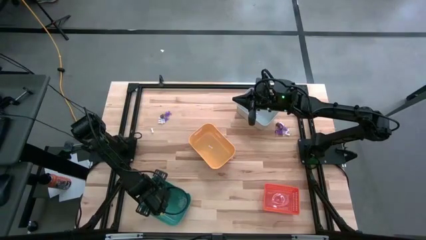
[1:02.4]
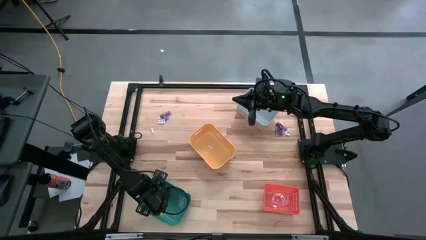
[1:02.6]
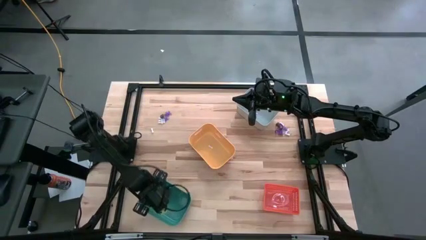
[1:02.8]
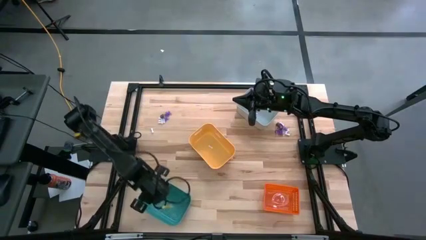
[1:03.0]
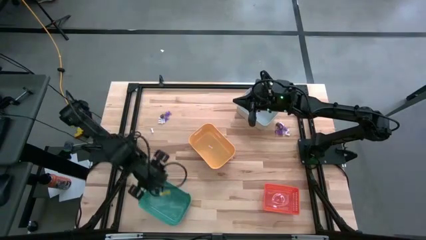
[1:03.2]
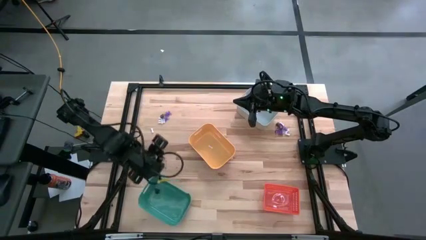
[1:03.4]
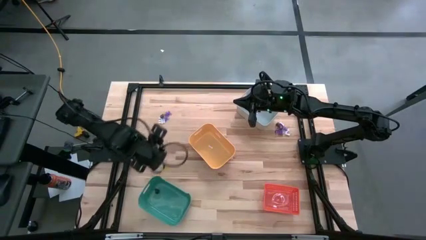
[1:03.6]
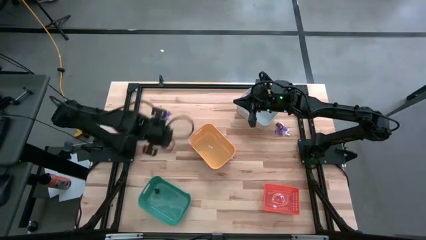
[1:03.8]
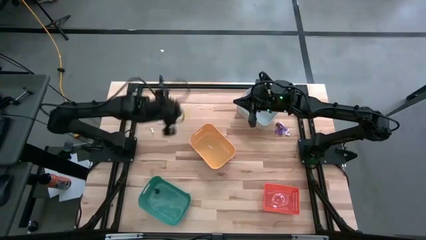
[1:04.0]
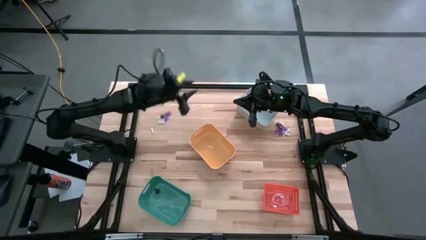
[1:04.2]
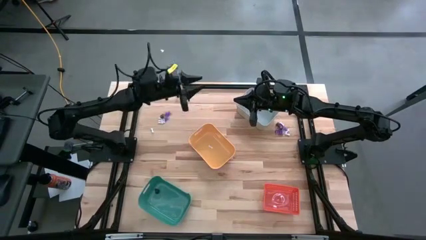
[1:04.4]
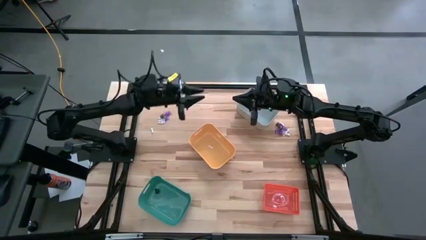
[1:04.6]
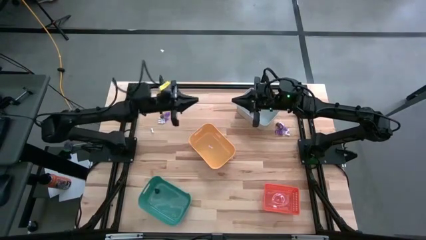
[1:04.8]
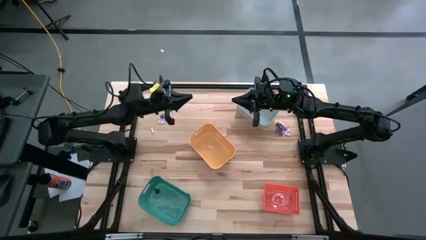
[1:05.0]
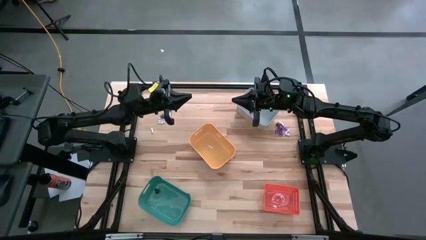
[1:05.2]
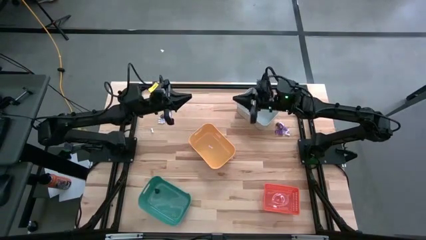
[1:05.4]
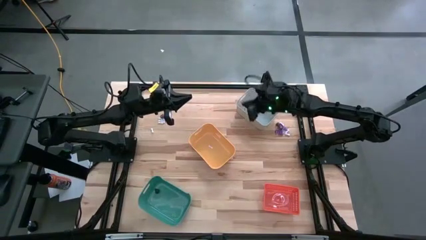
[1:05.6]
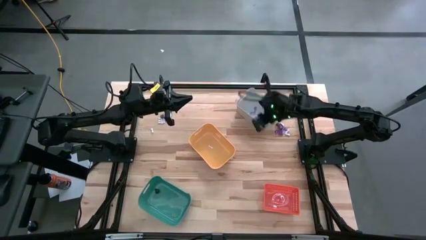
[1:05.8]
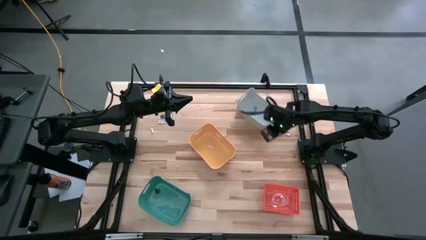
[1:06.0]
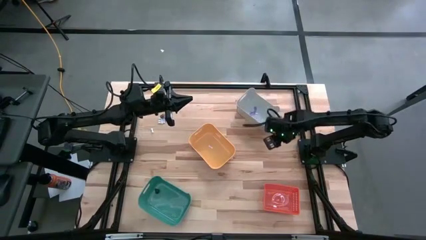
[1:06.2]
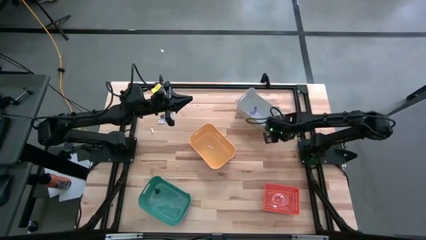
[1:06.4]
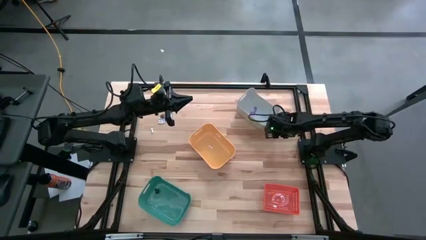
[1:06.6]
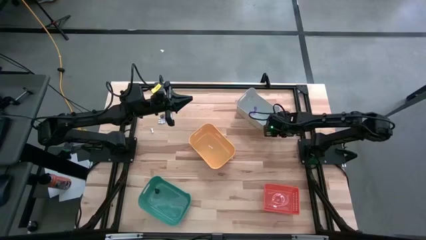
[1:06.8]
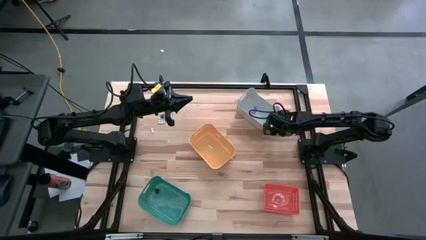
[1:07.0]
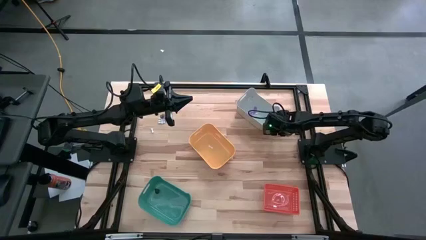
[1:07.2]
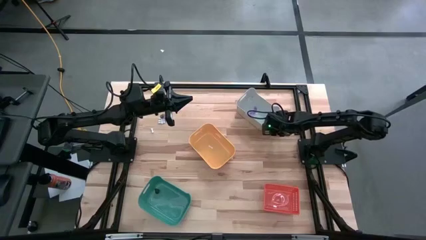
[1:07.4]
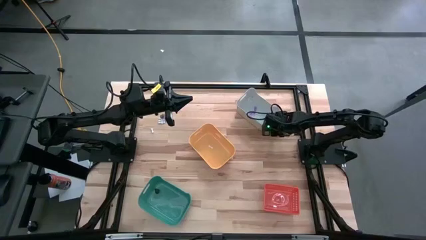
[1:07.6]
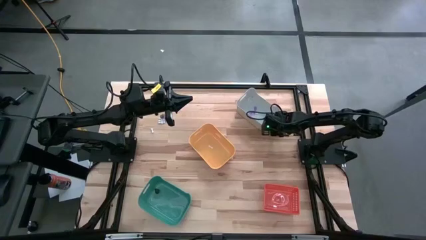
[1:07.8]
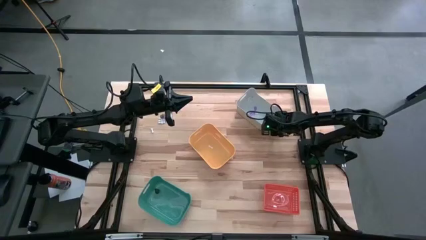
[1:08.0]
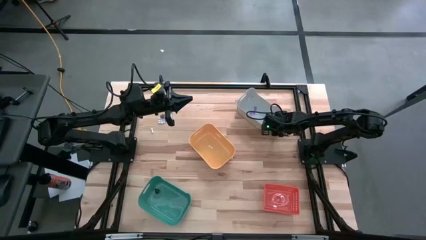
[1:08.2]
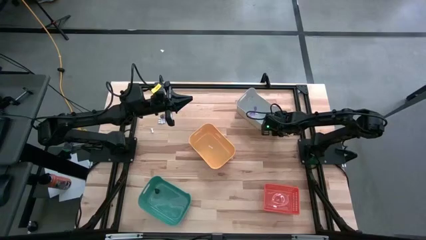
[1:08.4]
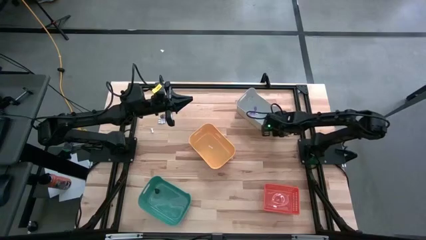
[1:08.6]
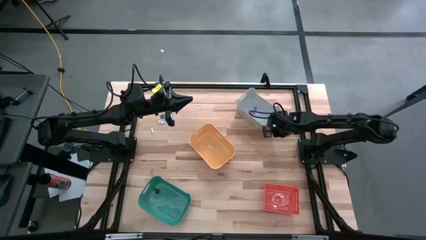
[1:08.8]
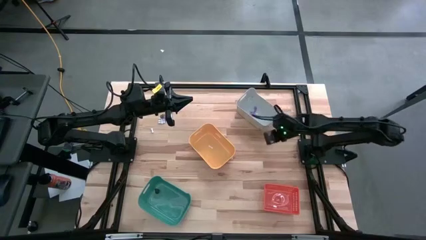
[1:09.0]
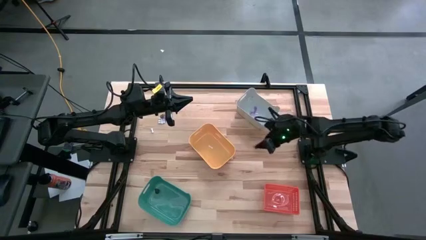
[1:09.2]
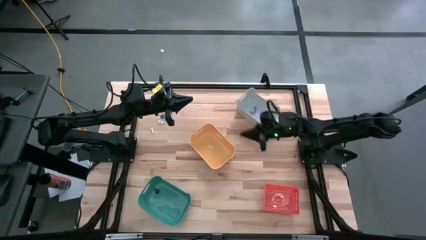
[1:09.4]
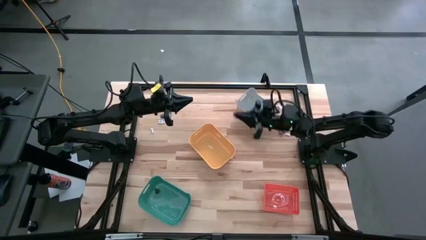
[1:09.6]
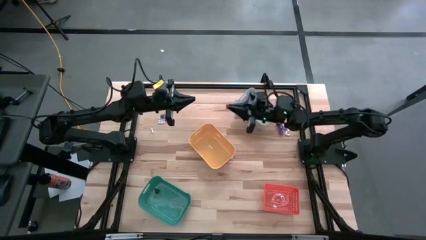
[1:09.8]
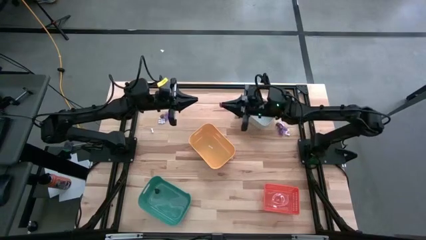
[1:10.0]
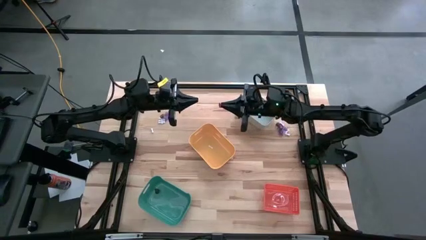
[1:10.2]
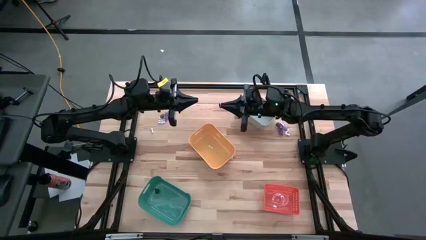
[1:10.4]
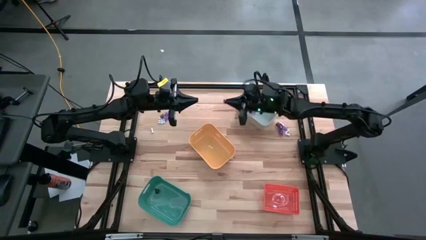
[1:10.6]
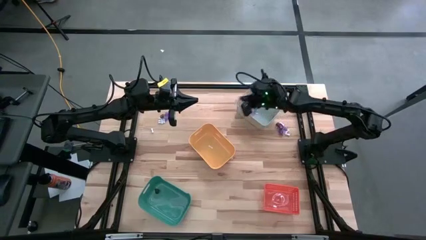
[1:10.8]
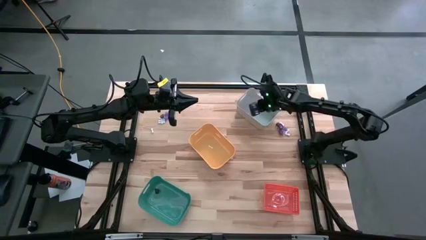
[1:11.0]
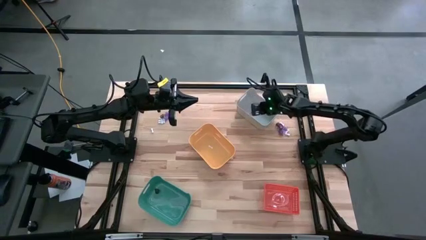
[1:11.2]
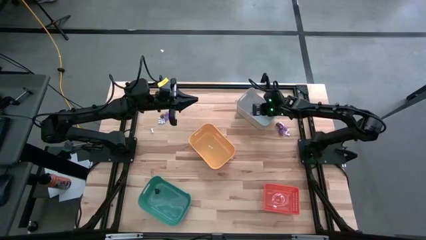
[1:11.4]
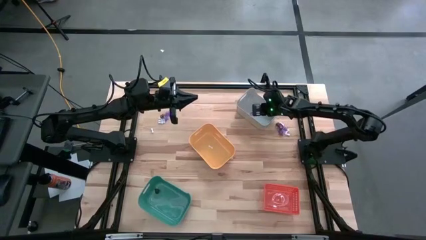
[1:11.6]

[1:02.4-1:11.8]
Task: Sort Halloween decoration
Put the purple witch hat toy into the white bin

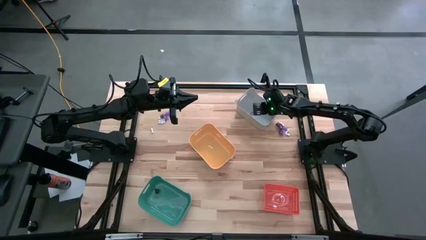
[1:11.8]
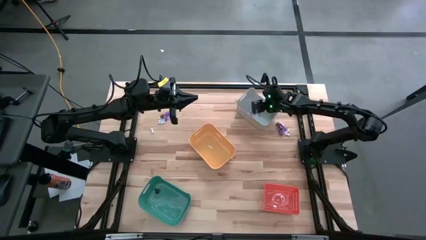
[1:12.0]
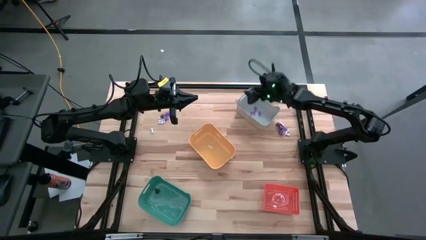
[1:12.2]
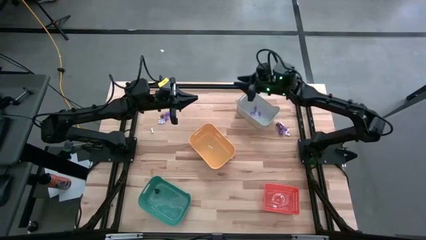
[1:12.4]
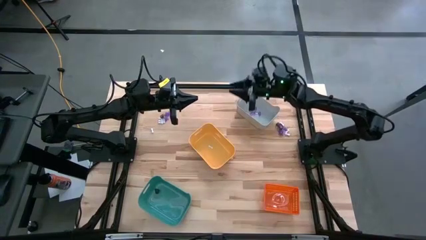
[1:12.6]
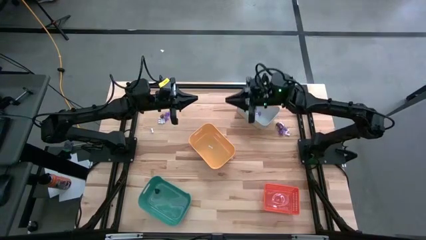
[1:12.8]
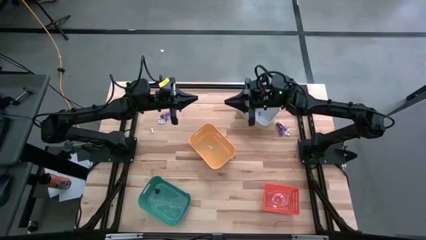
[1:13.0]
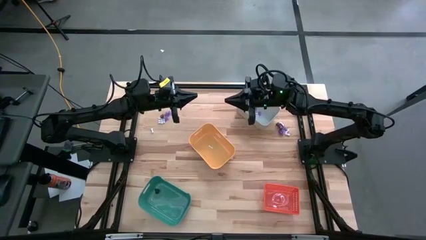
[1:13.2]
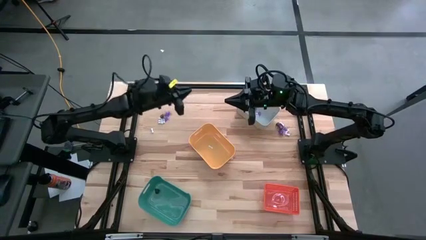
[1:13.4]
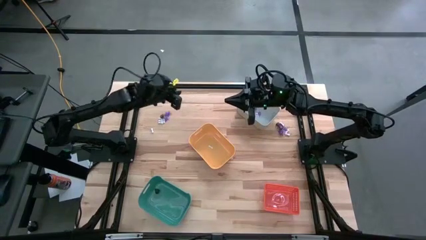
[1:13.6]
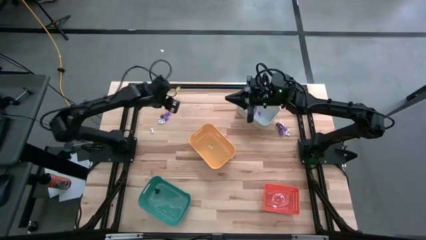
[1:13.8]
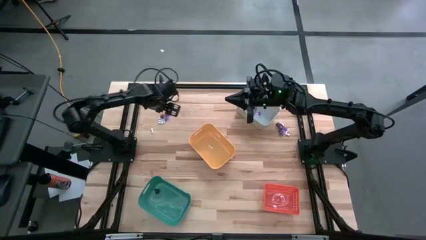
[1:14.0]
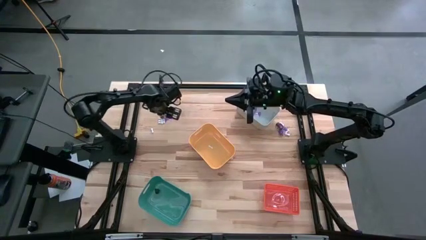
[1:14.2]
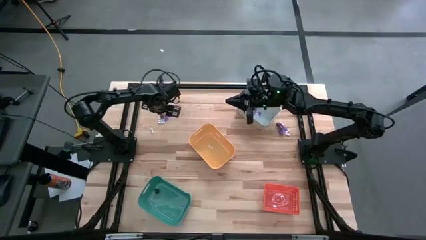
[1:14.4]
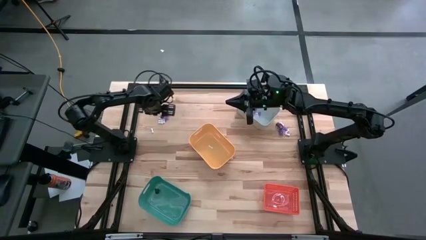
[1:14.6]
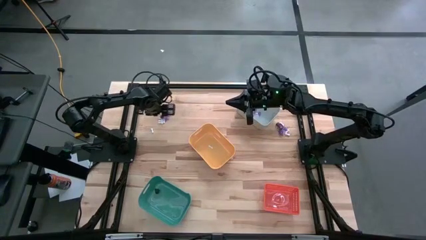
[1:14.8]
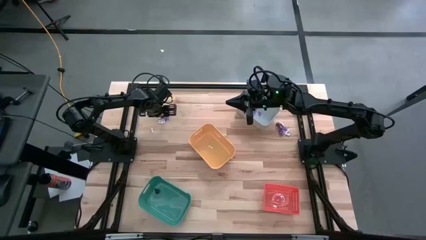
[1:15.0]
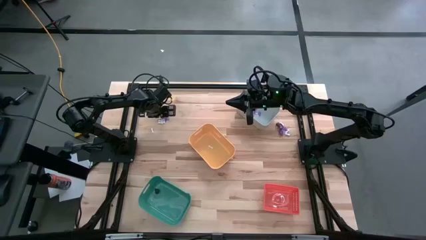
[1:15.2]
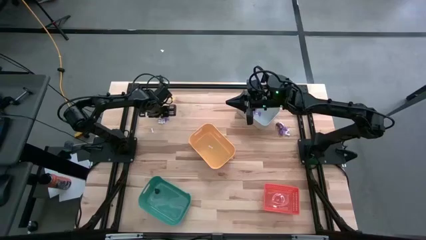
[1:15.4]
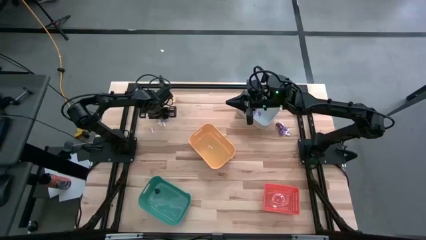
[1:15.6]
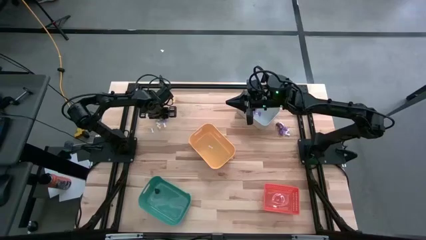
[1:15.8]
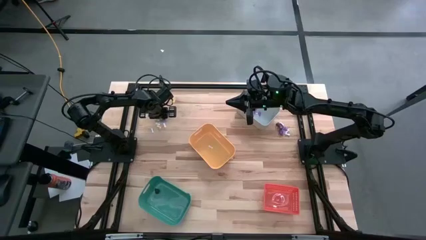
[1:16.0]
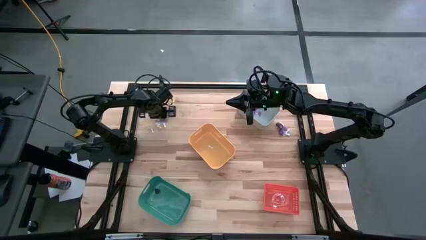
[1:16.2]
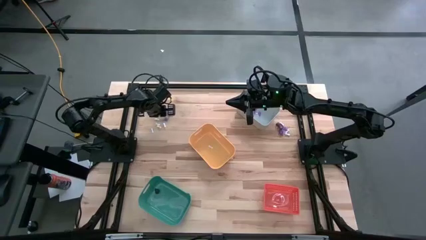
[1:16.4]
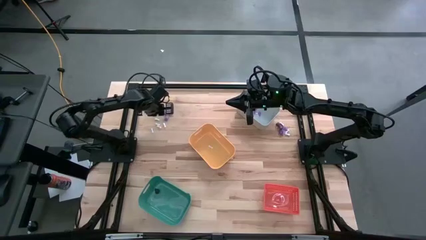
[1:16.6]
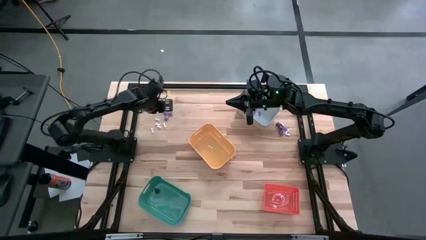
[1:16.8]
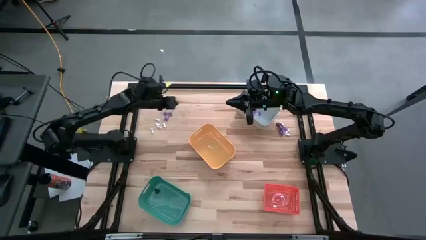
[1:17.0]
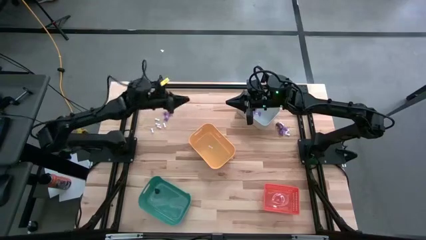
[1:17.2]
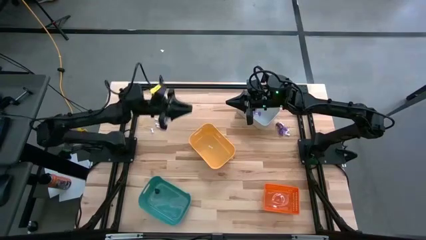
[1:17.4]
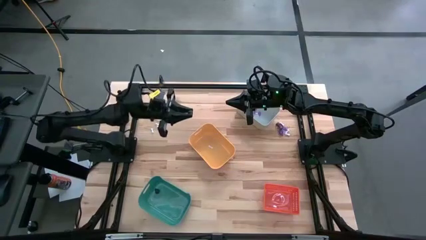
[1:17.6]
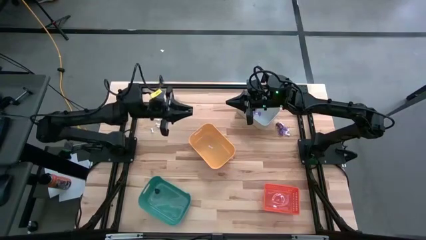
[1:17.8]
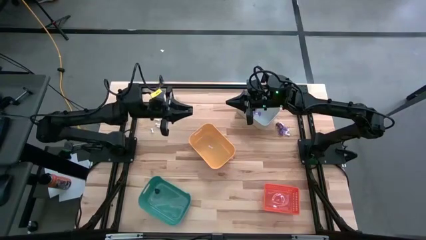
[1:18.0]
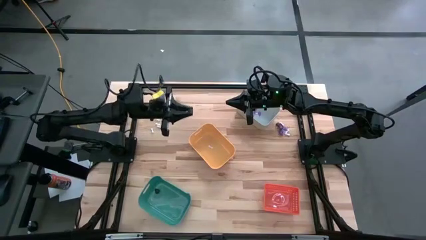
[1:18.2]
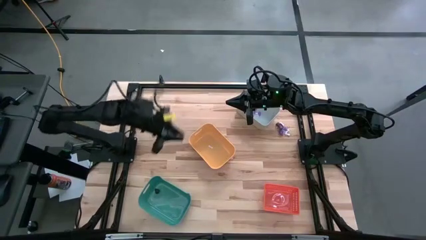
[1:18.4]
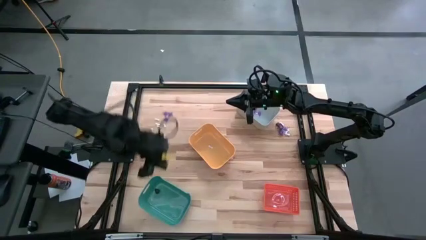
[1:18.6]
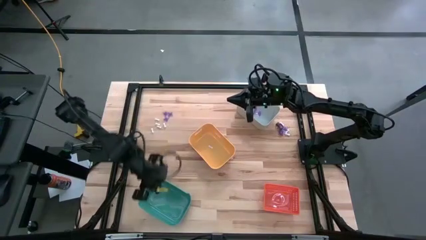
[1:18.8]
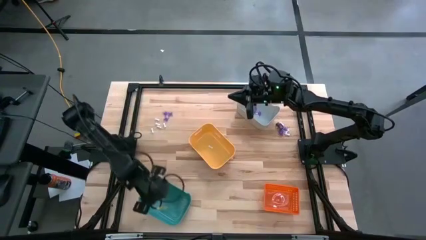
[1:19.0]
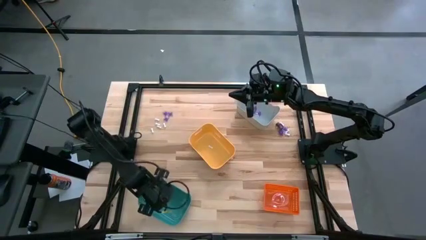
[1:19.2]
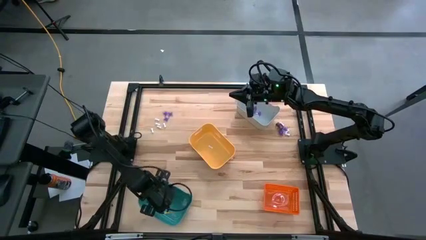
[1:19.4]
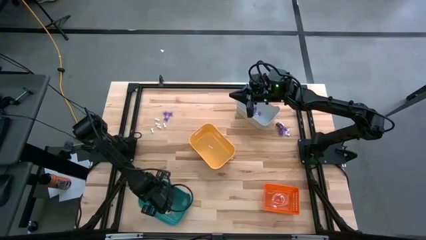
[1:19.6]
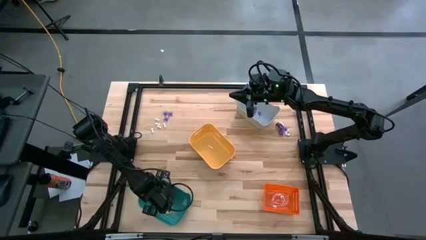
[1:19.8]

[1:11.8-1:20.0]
Put the black skull toy into the green bin
